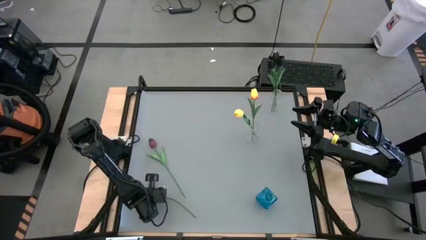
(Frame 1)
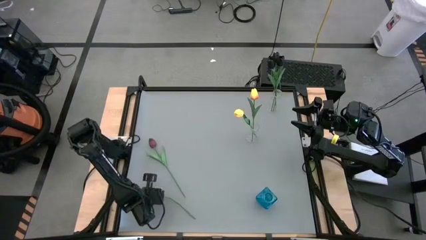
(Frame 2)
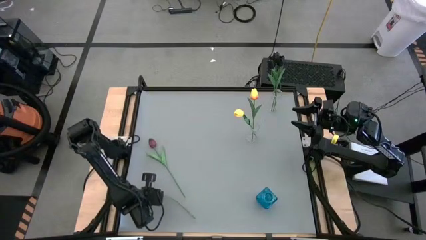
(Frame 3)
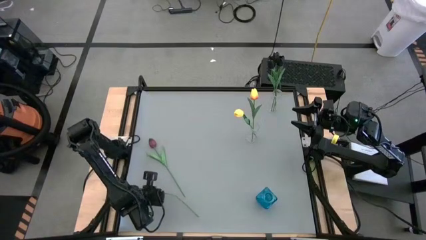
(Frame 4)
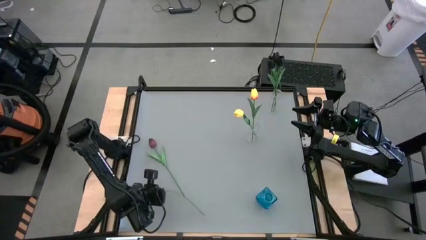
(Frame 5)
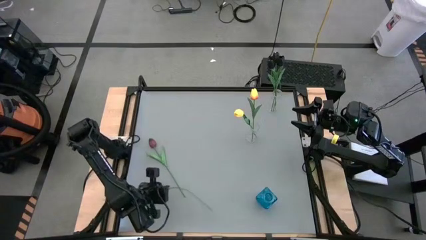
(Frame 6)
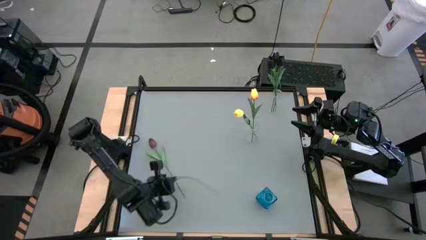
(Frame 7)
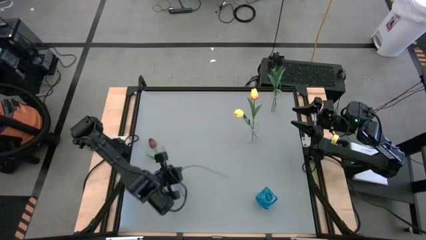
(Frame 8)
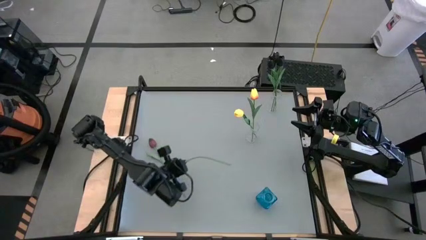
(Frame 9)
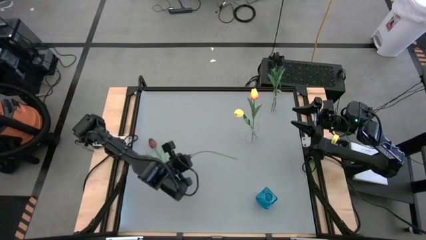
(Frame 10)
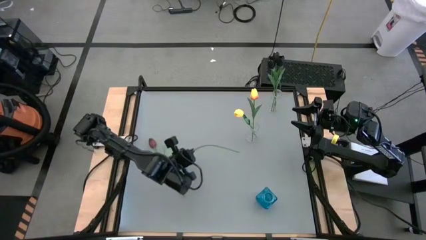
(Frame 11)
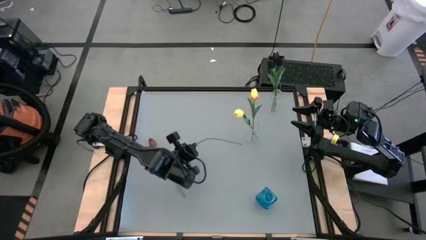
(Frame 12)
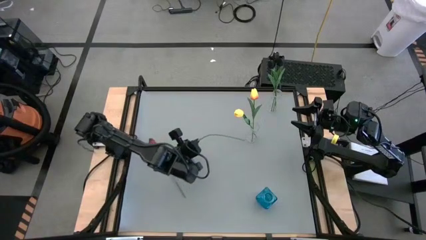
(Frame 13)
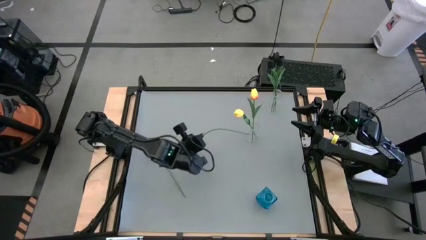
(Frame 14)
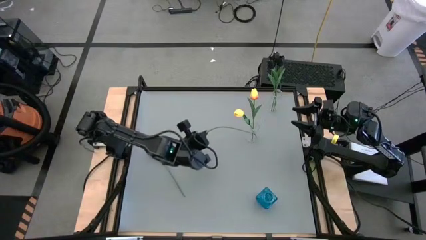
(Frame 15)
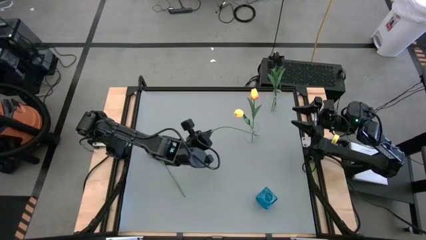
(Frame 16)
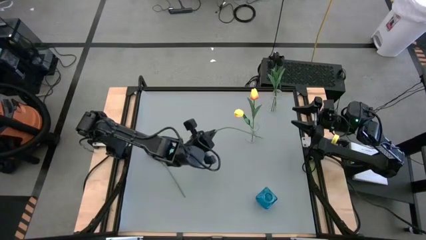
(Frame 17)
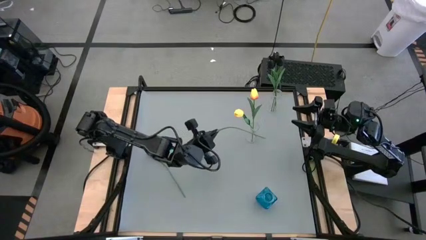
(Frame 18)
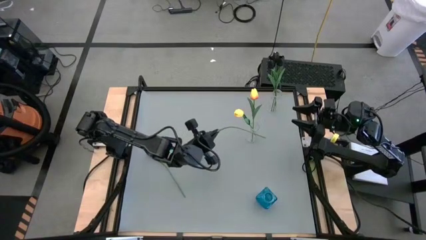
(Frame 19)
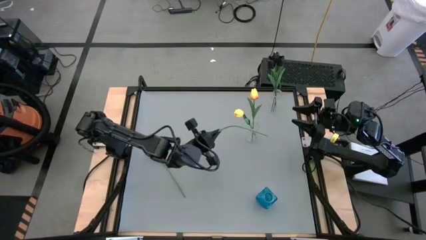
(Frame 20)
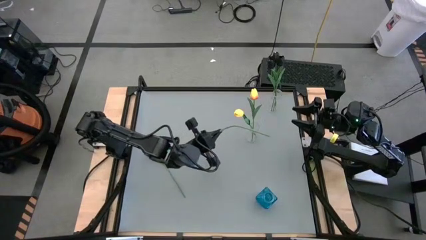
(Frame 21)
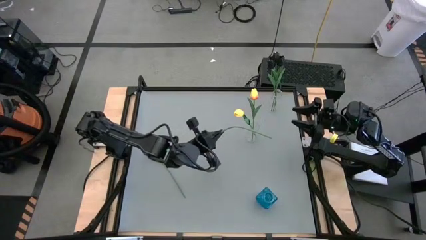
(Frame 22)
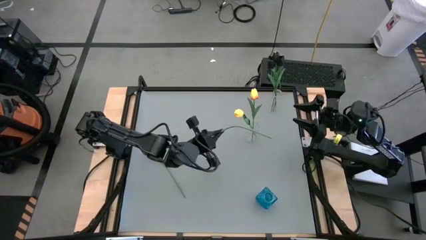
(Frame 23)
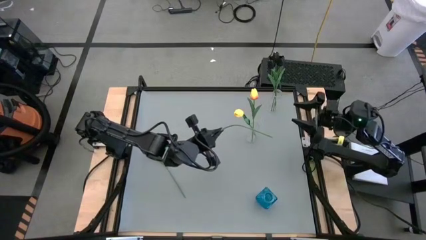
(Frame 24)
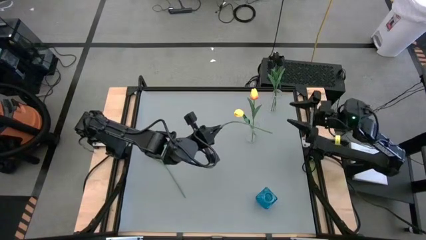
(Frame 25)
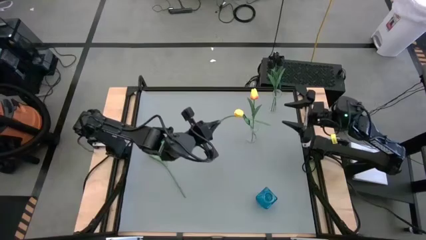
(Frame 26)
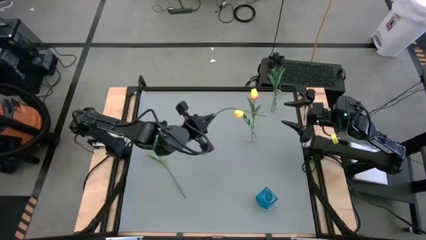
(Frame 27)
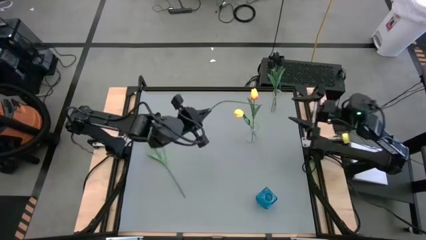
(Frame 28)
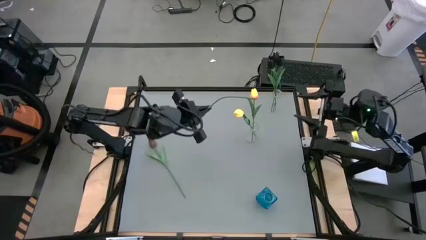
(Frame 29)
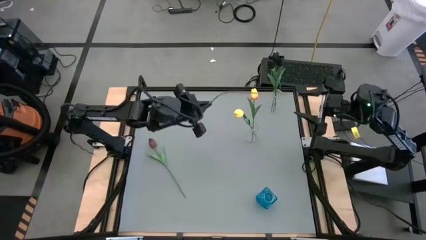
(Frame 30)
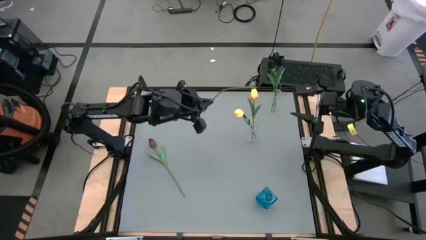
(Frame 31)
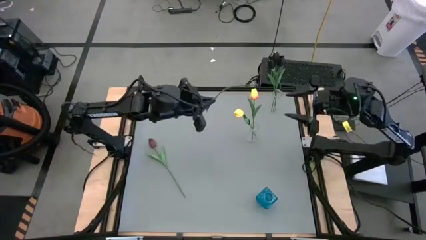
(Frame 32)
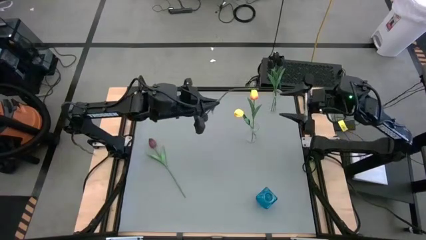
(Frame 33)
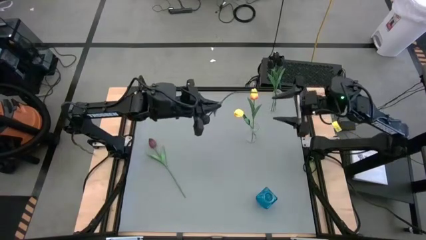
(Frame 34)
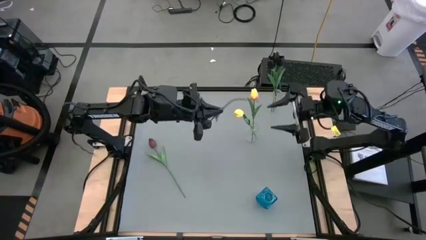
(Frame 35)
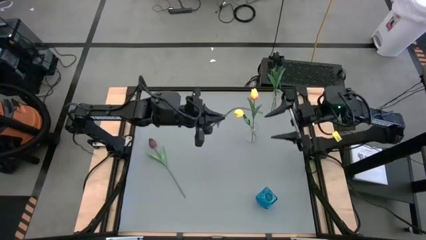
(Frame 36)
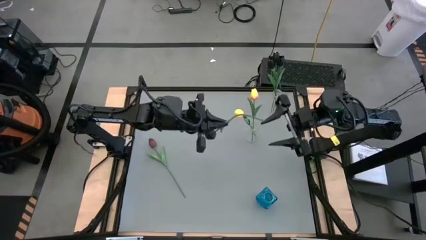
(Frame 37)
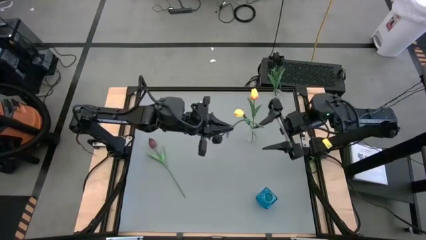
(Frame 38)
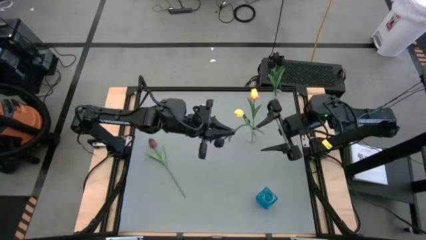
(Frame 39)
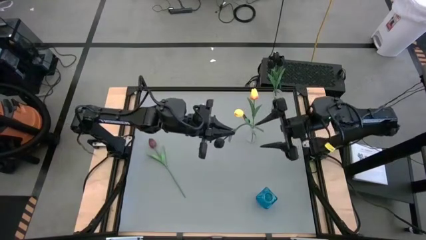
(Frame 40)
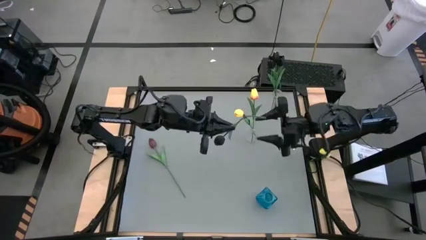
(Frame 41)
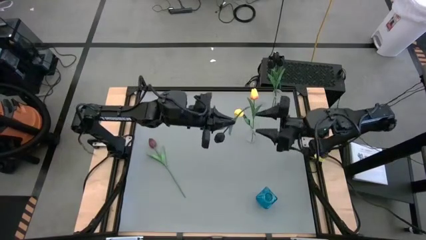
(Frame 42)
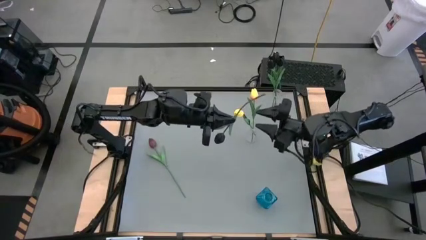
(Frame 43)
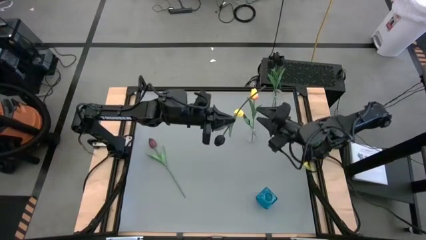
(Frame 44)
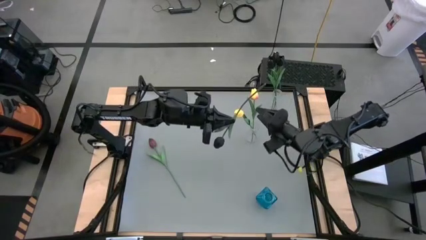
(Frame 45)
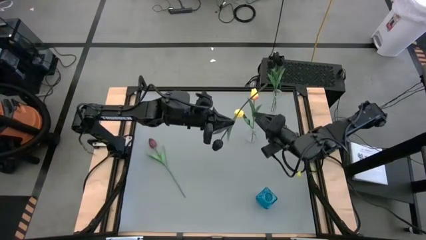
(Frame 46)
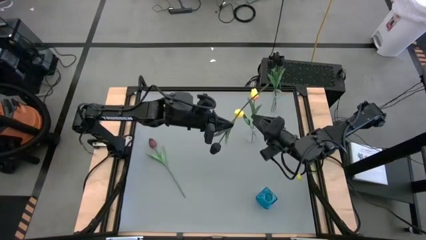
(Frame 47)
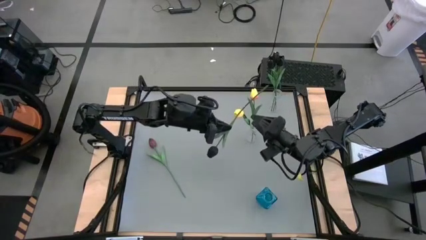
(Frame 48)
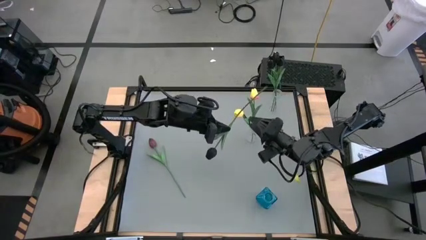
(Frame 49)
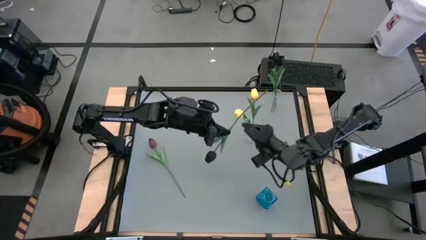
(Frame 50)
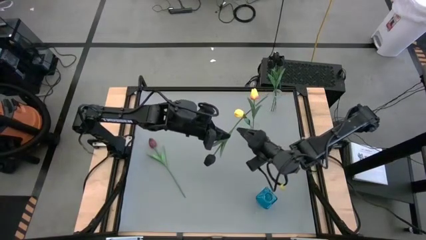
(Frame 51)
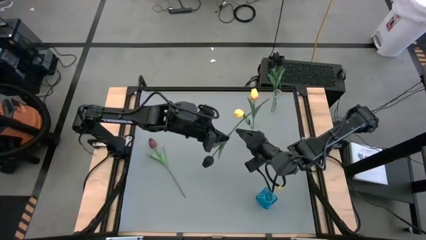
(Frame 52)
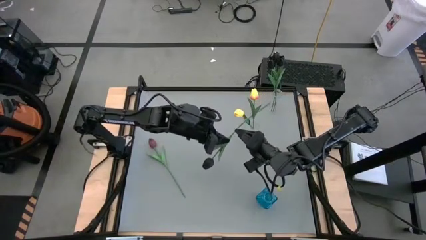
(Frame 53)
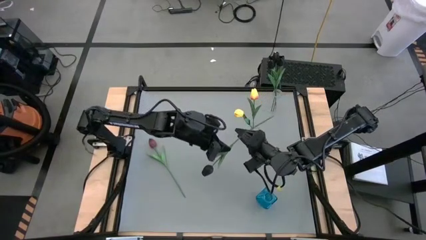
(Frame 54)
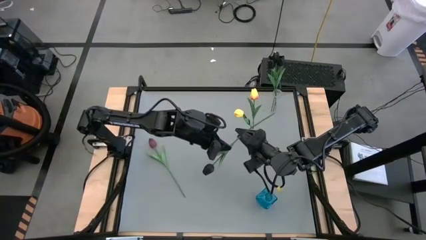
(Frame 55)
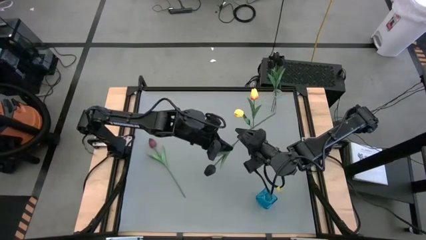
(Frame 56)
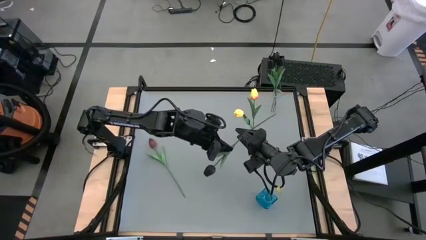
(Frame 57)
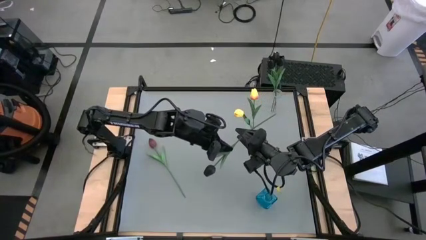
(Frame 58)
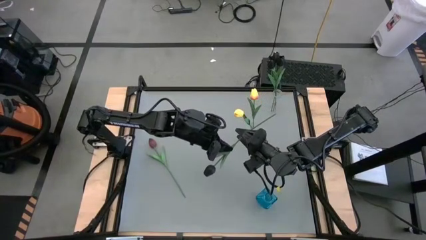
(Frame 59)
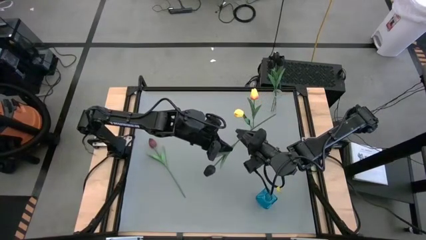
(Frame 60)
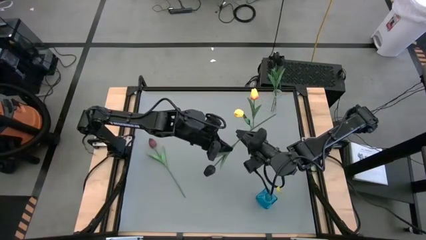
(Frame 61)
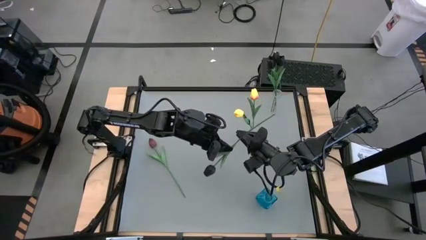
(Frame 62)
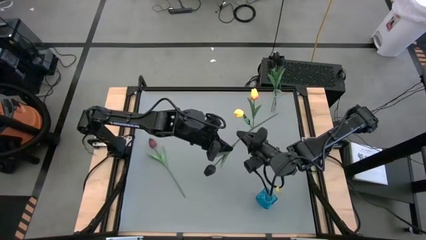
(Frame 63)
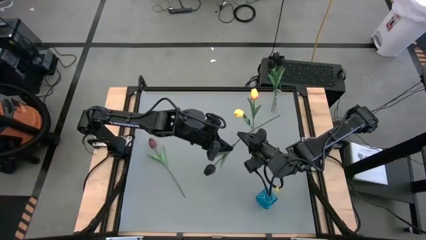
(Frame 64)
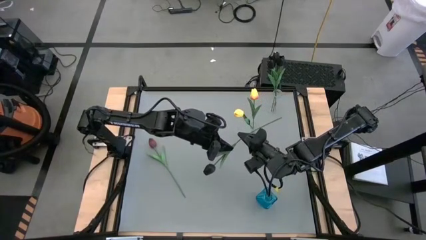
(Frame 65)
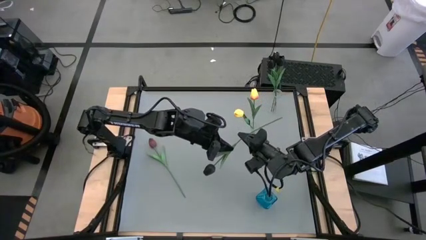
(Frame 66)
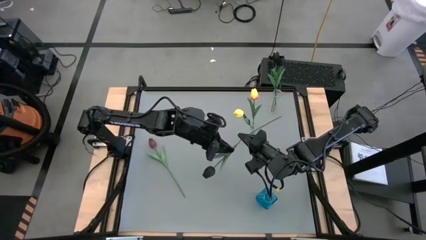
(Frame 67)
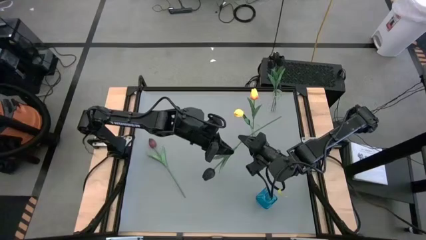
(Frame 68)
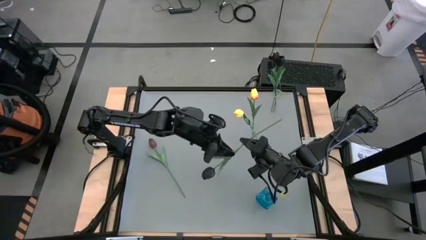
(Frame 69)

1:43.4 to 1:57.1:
Task: Sort flowers into vase by color
Put the black tulip into the top transparent vase

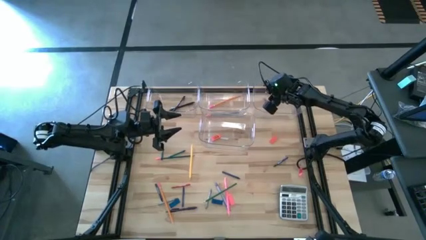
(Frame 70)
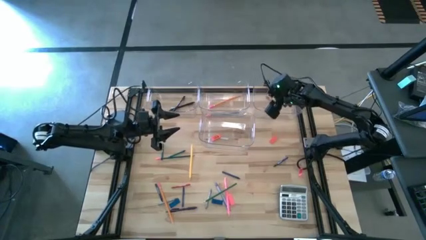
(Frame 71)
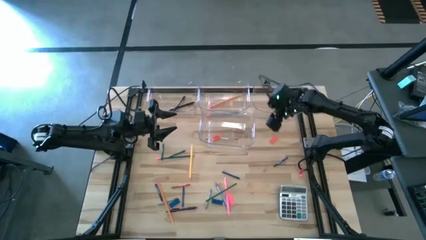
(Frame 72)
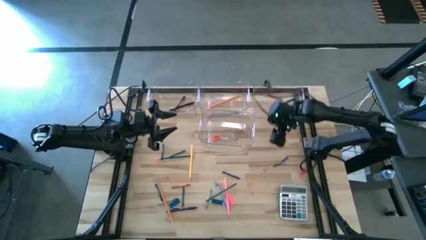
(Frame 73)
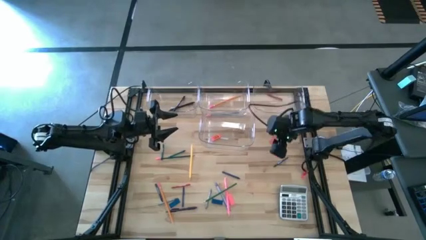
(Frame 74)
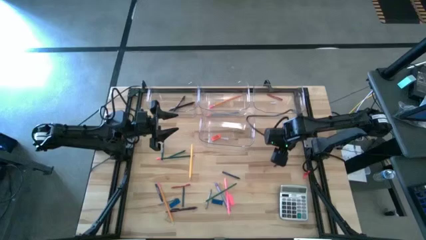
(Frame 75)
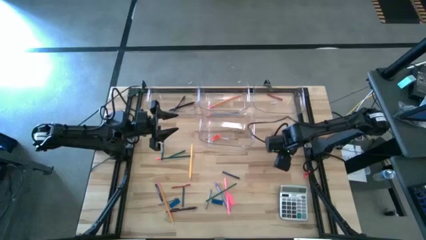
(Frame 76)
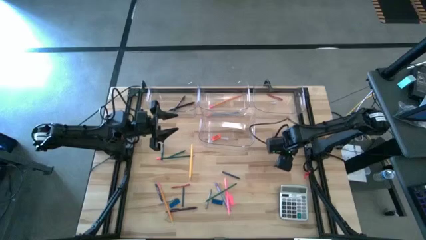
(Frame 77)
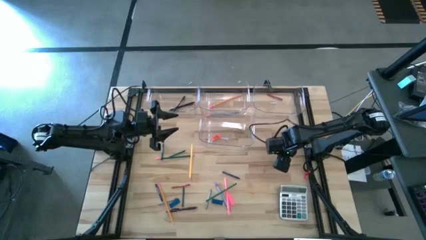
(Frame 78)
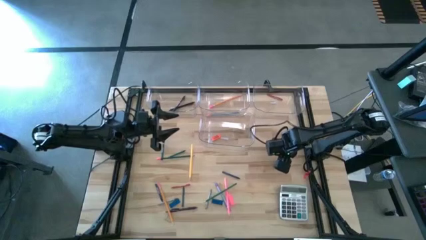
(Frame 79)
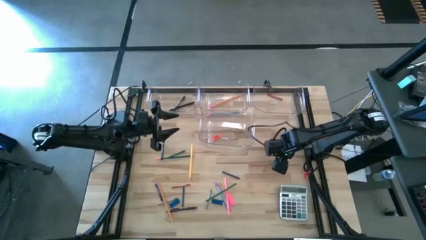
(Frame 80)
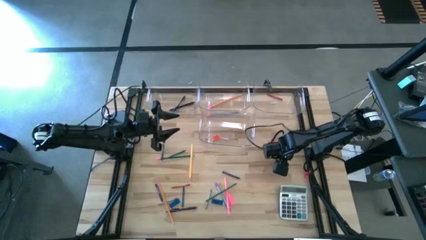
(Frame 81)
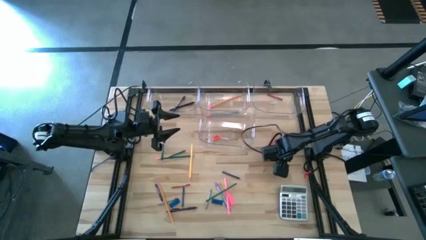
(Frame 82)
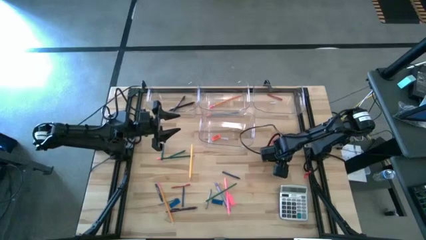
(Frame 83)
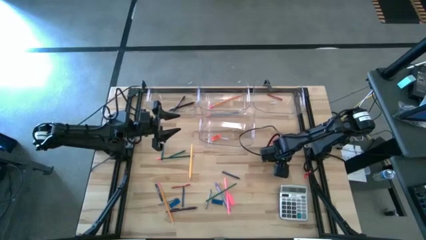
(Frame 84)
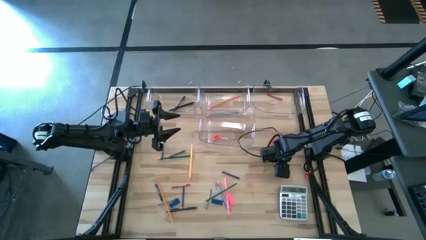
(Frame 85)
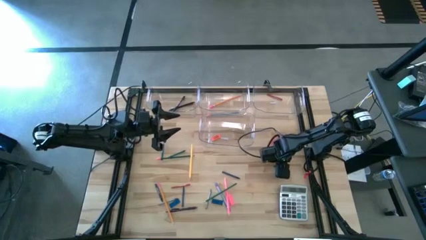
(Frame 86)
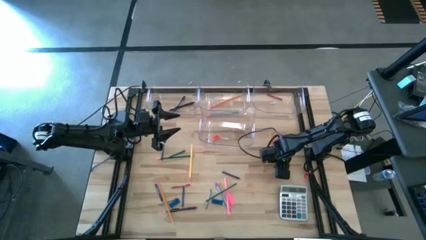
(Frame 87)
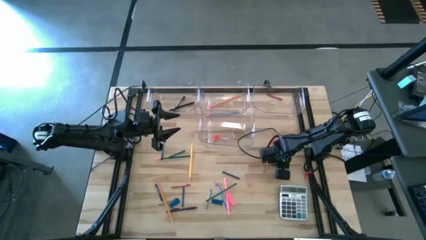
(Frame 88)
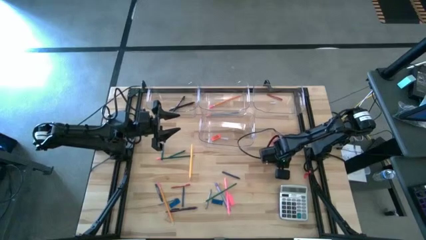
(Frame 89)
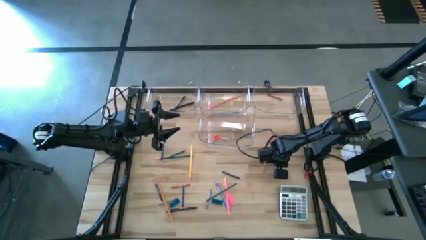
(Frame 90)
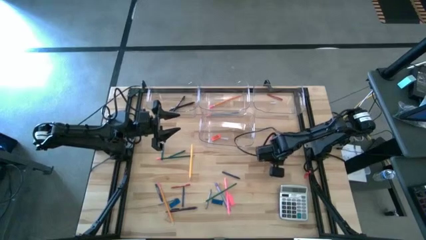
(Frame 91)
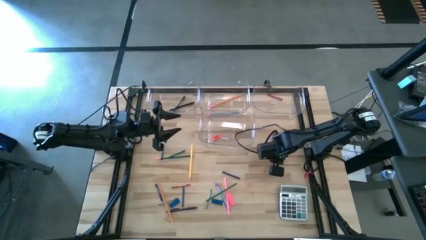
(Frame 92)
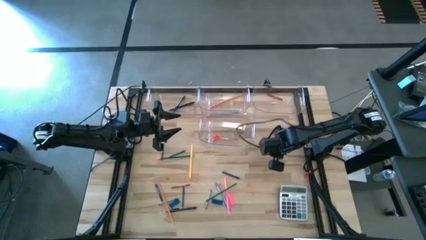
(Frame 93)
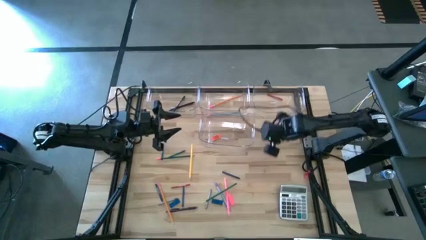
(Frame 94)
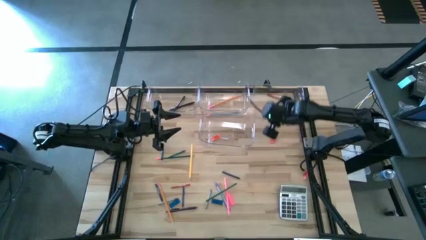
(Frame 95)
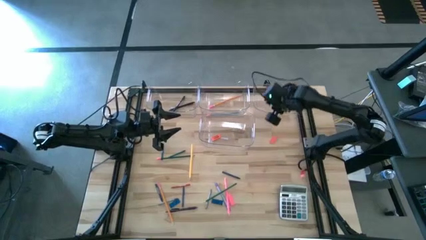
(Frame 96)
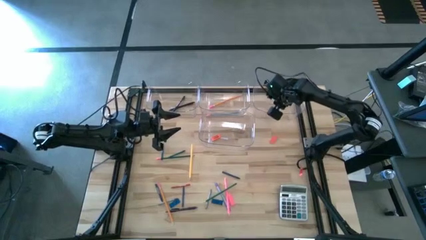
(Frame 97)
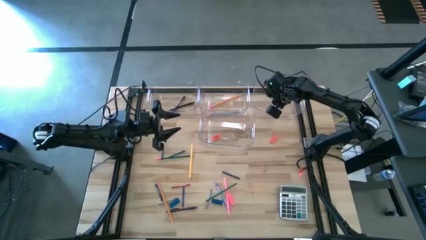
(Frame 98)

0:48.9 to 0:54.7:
Task: Sort crayons/erasers/pens/pencils in bins
Put the blue crayon into the top right transparent bin
